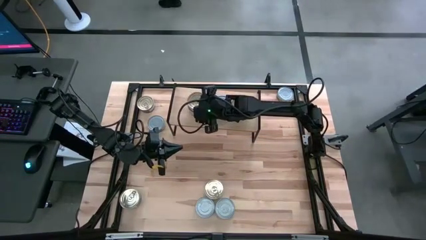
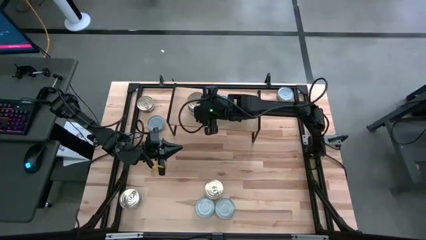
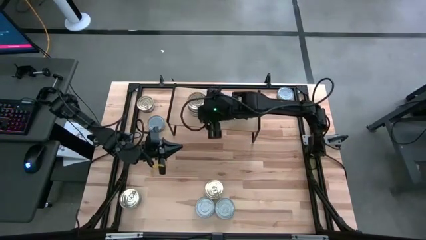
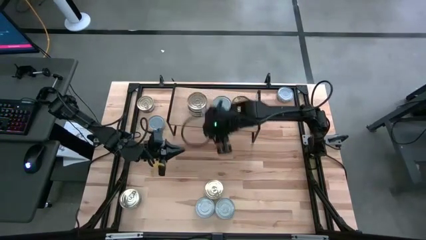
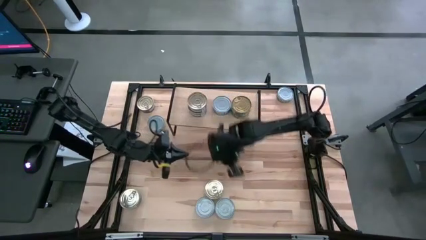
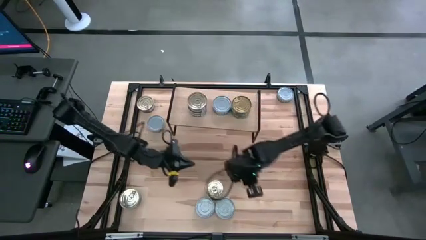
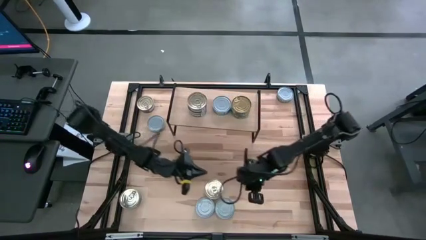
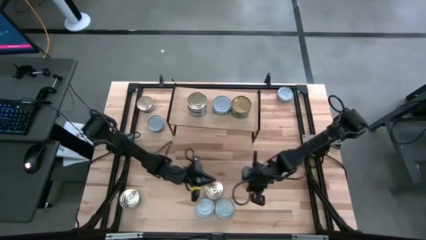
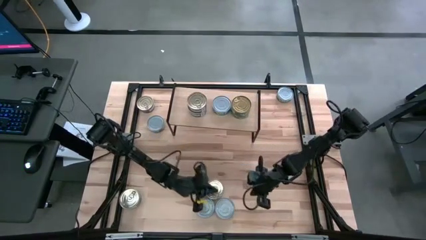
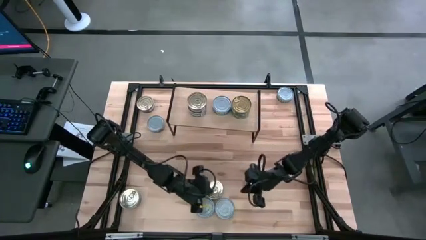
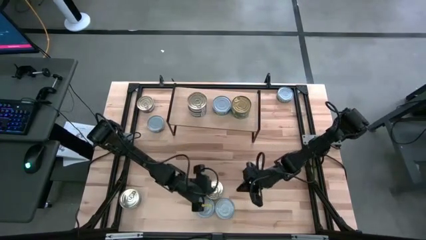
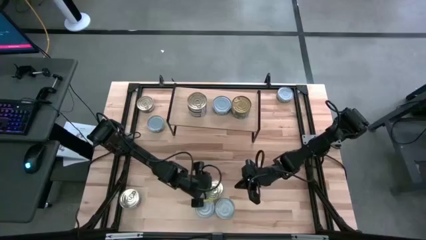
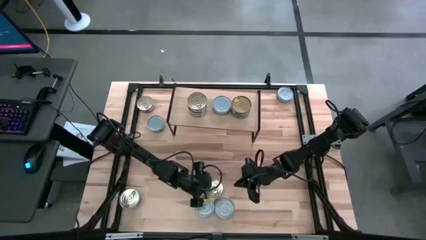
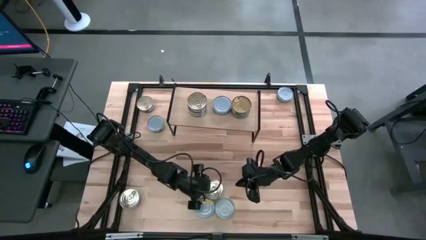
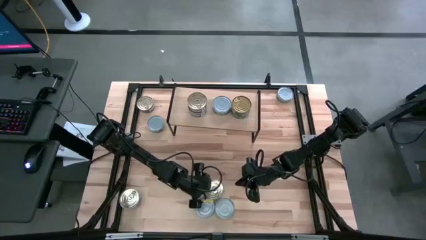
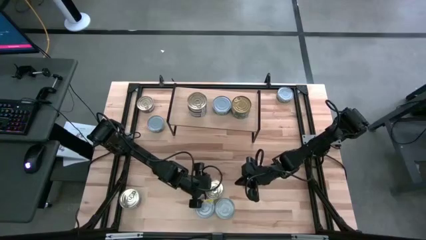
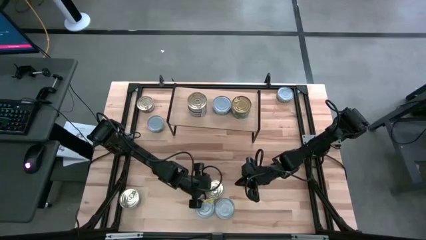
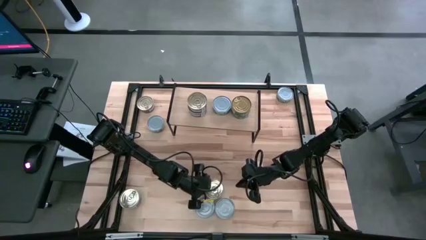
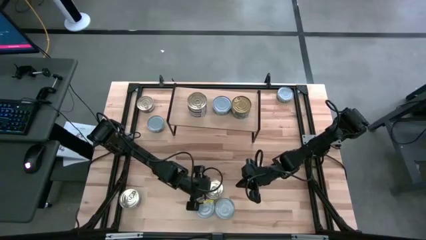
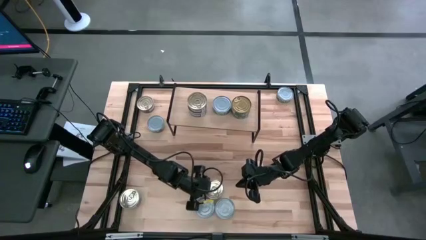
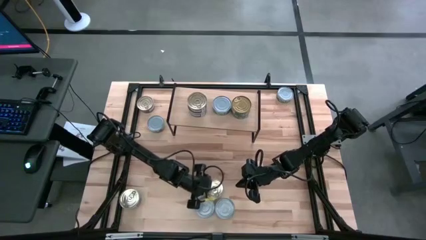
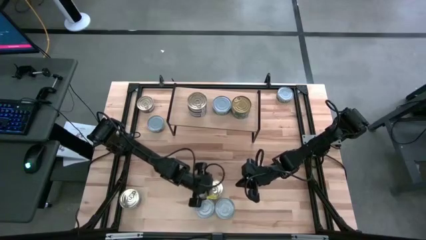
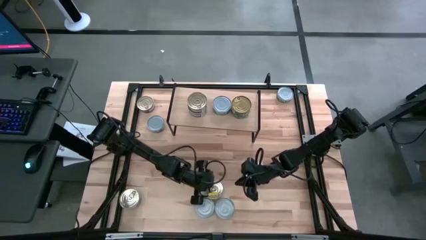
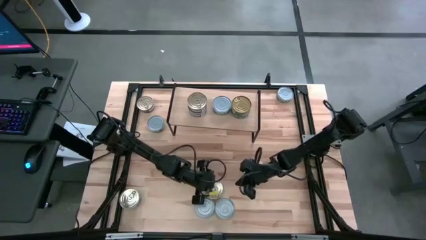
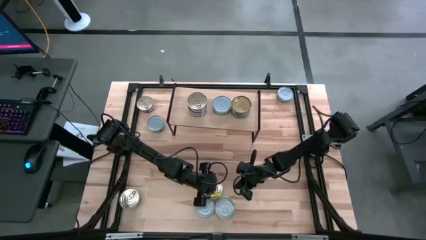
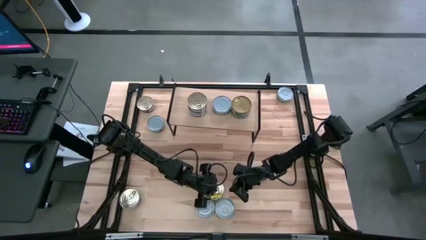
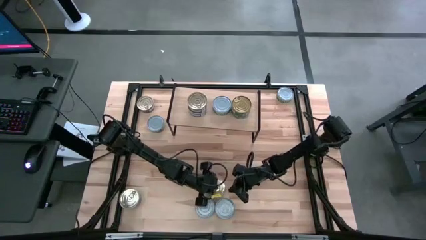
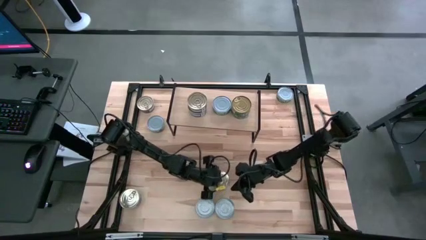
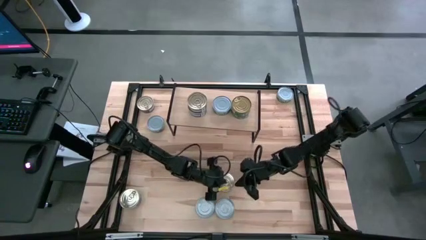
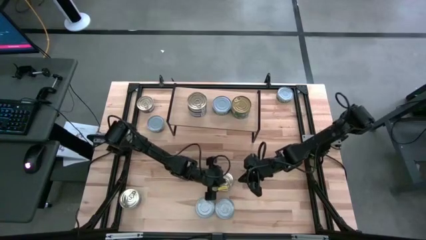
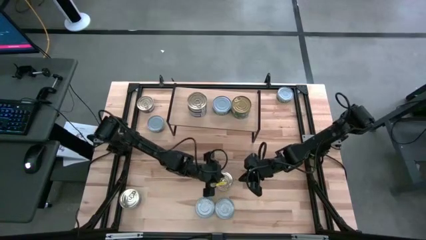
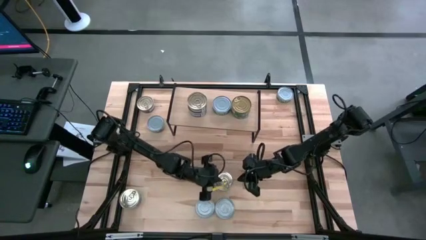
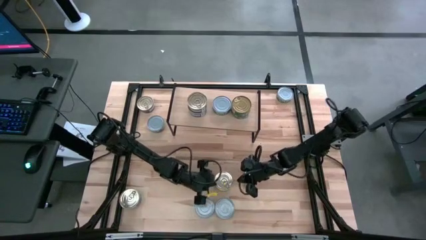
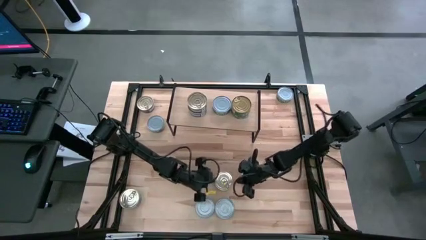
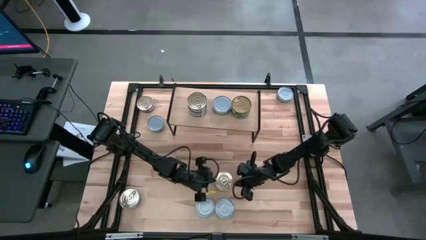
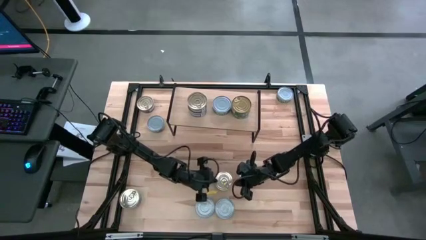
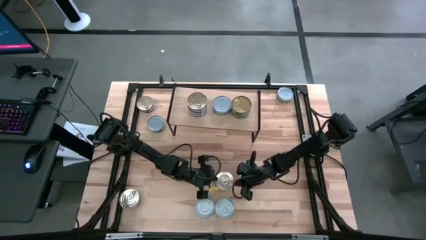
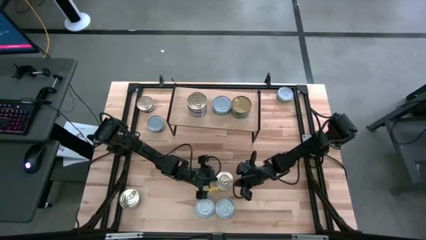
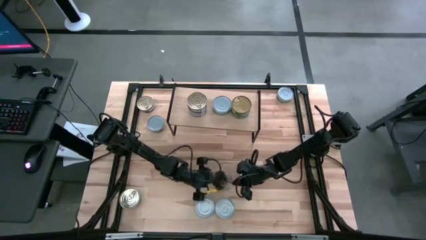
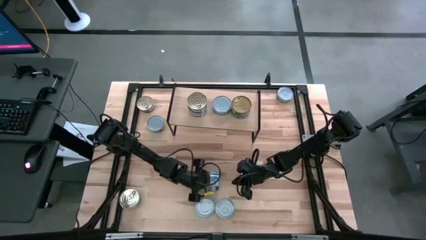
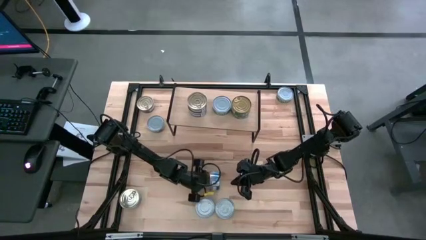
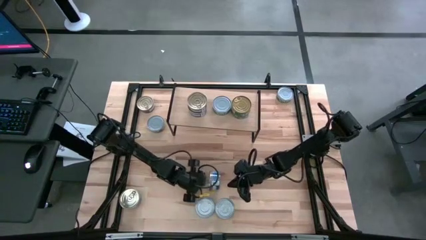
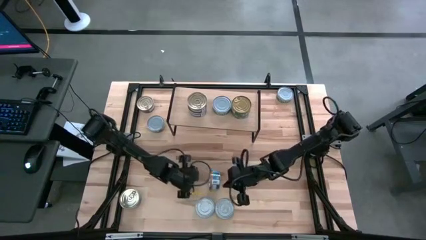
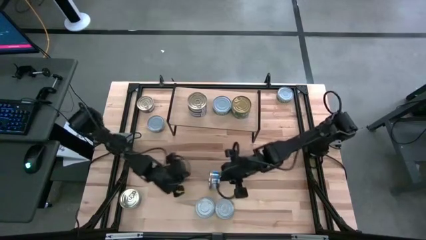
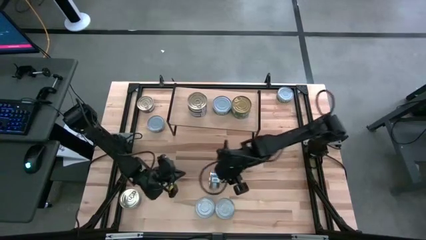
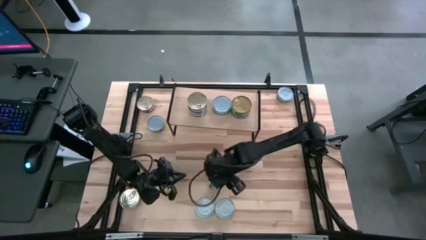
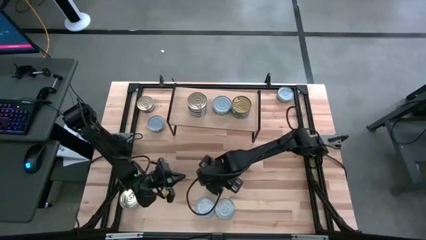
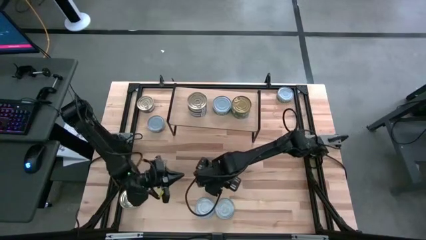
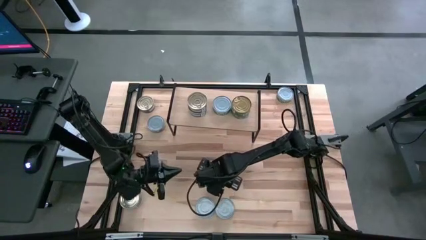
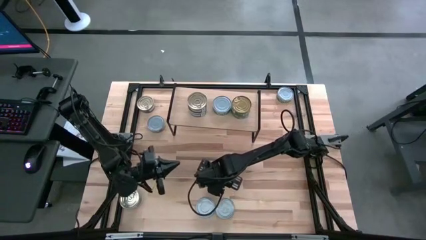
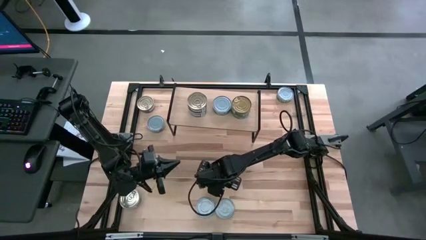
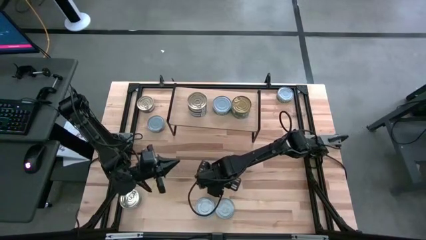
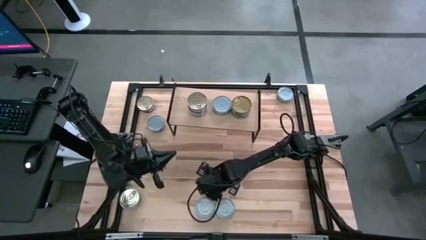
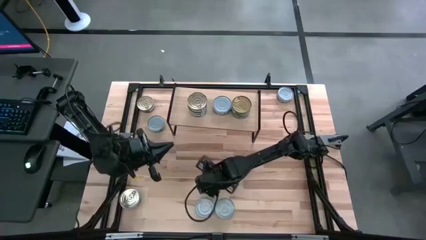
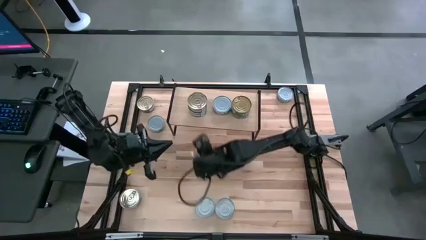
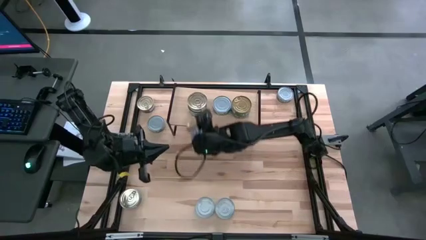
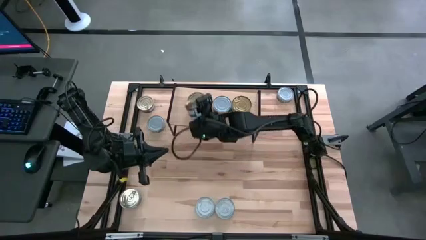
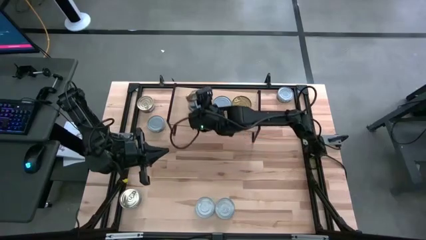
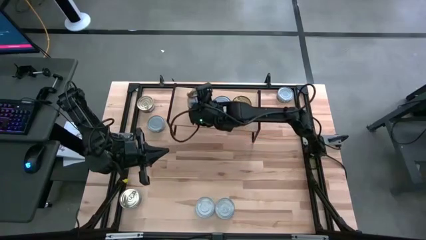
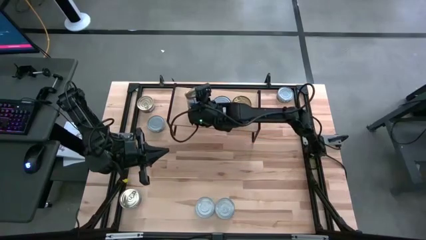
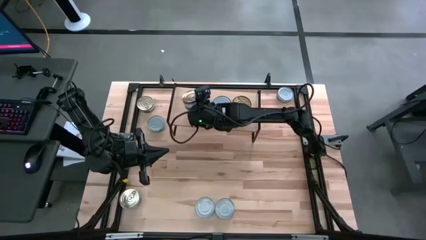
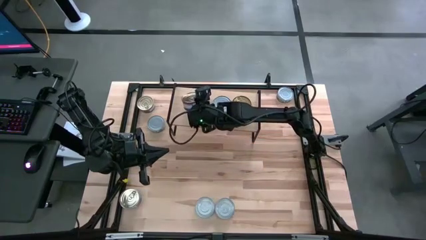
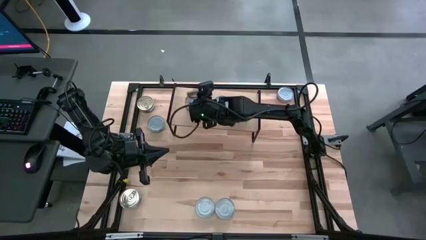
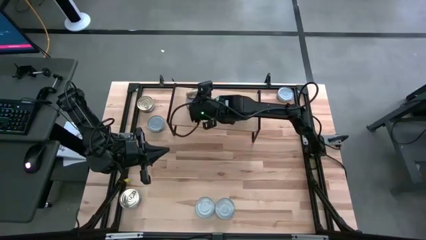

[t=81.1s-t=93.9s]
Task: Stack canned seafood by type on shelf
Stack the blue-pink tuna can on top of the blue-pink tuna can on the shelf

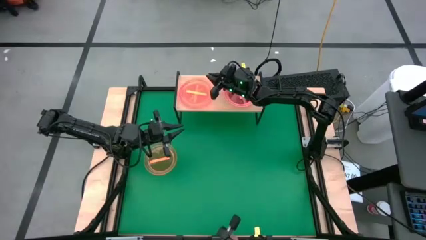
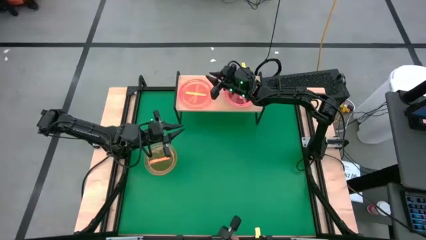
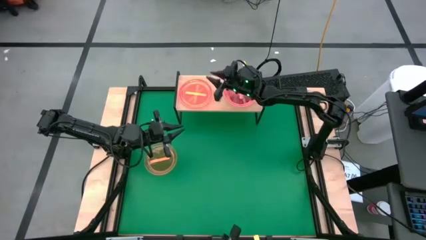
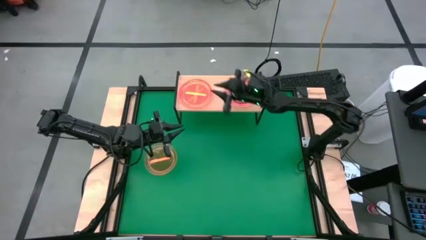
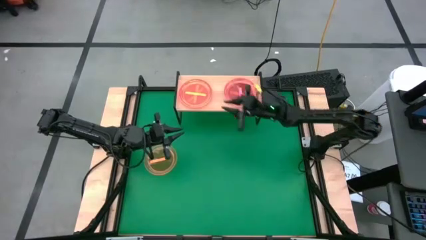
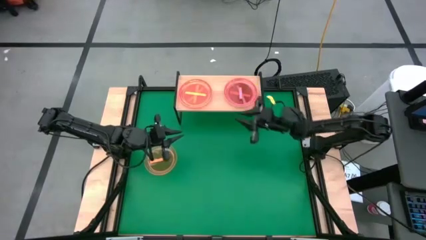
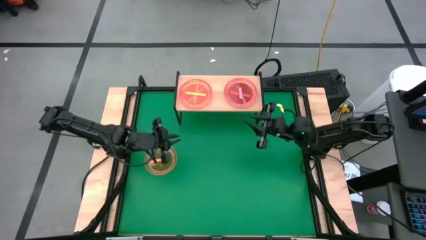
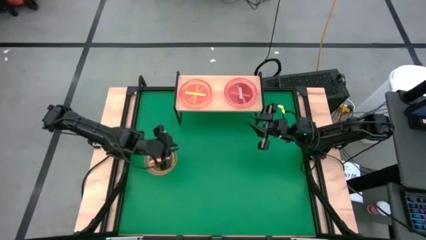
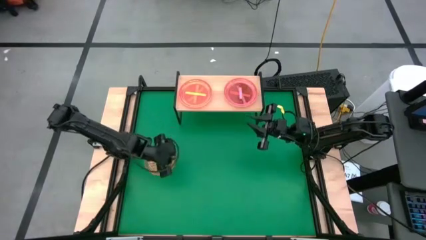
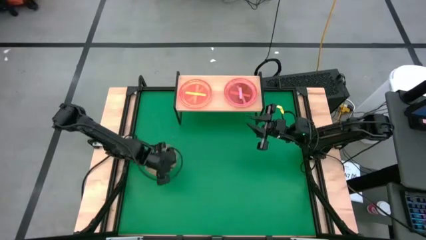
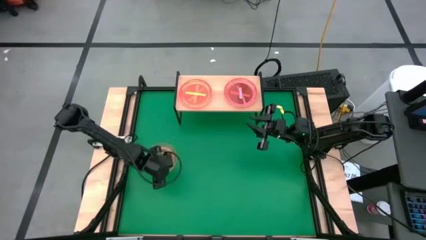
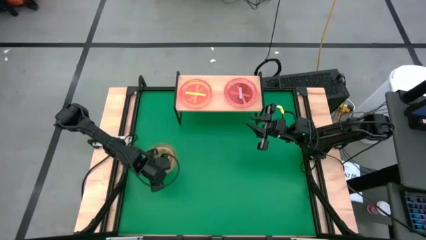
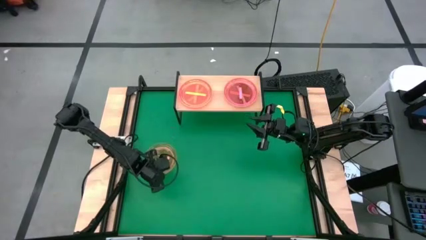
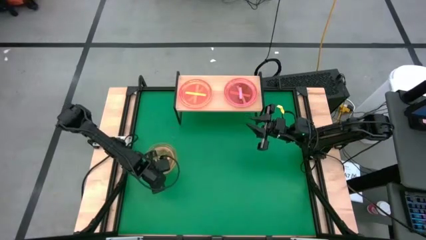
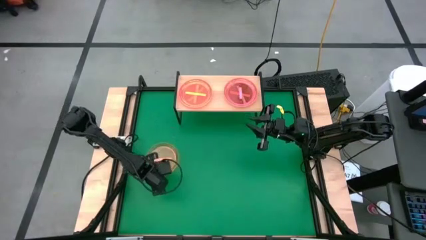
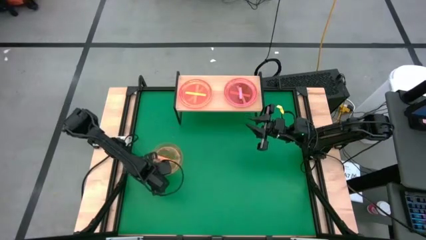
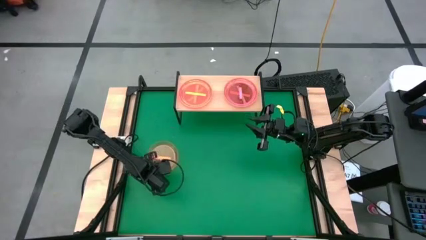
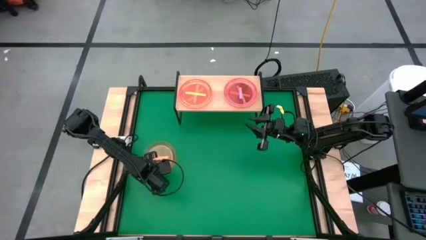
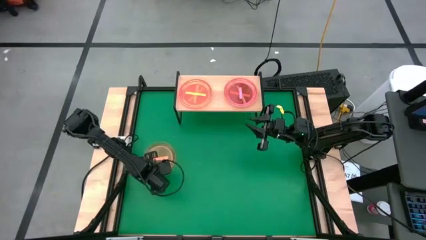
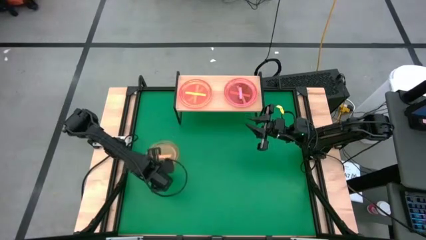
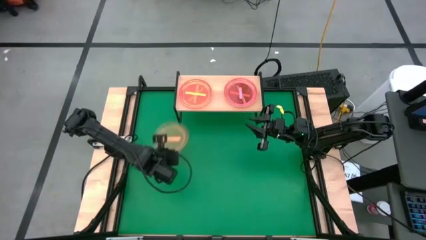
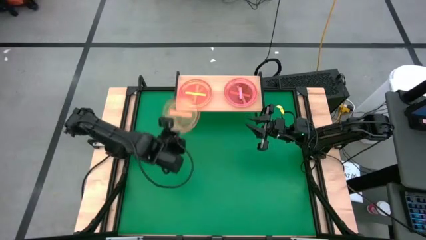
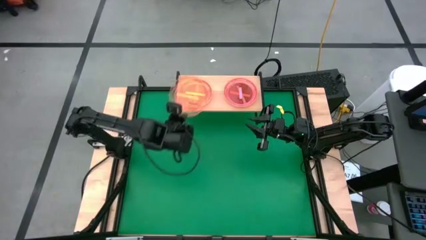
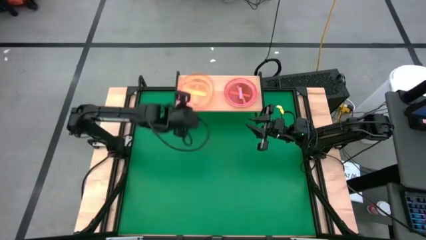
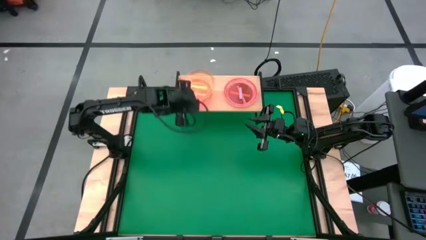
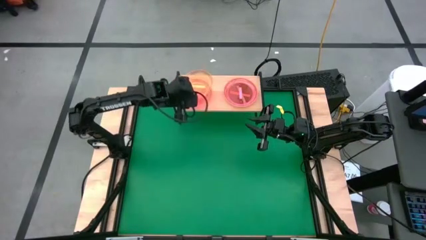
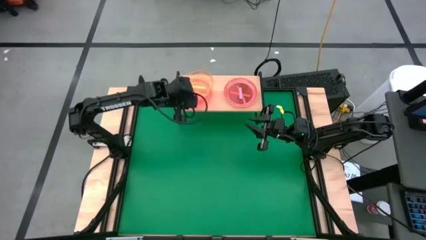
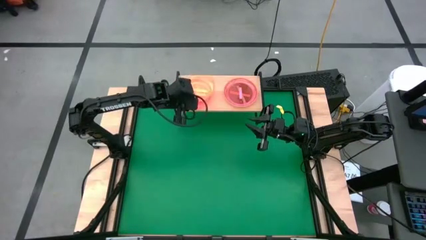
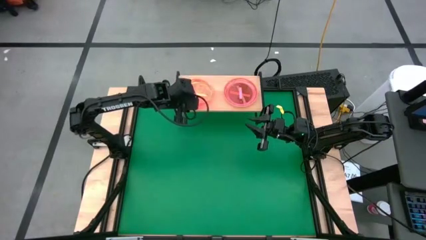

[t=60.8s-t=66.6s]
Task: Place and stack plates onto a shelf
Stack the orange plate on top of the orange plate on the shelf
